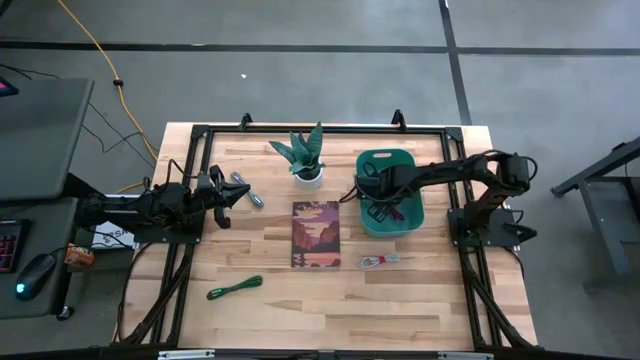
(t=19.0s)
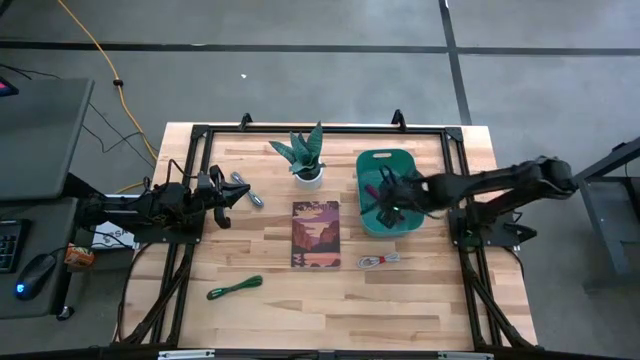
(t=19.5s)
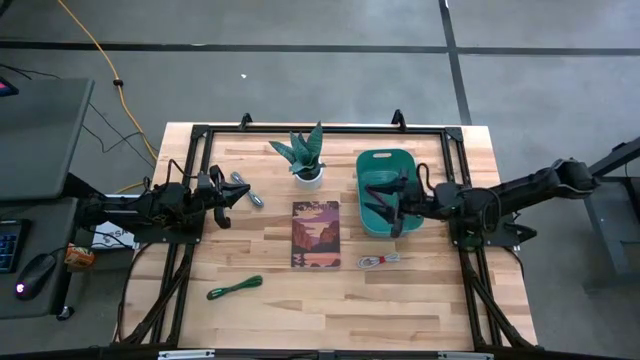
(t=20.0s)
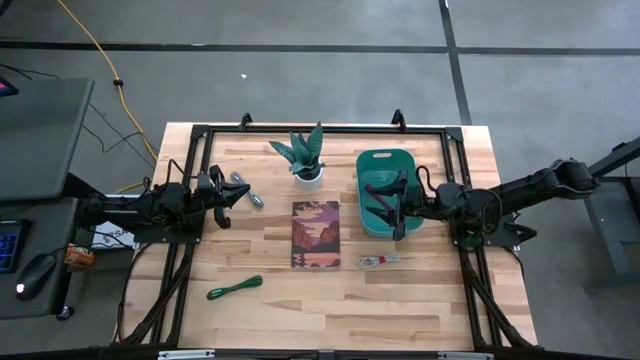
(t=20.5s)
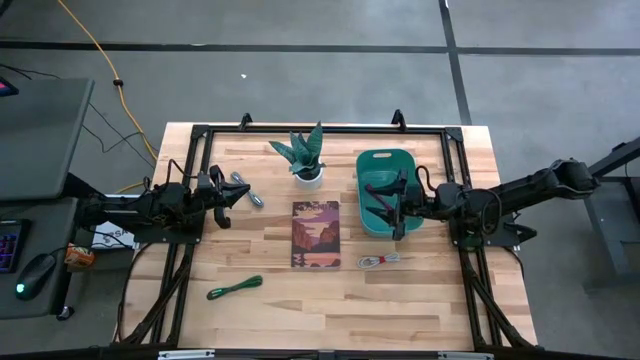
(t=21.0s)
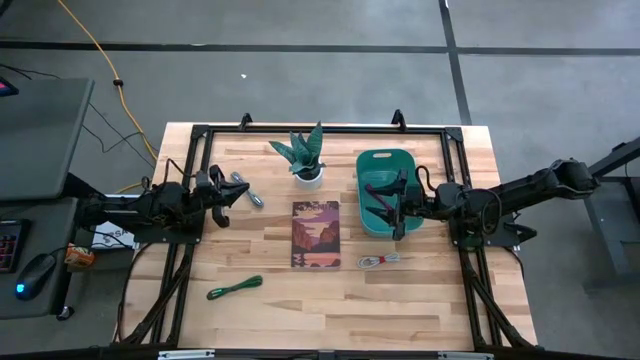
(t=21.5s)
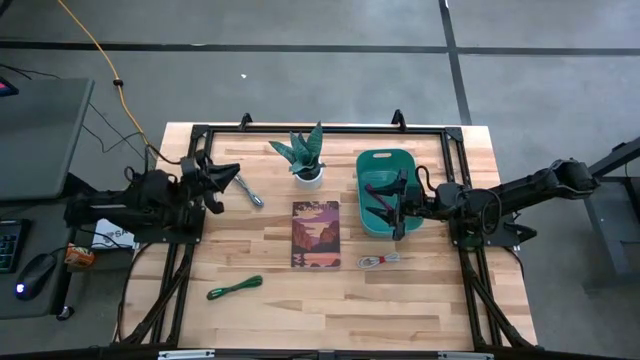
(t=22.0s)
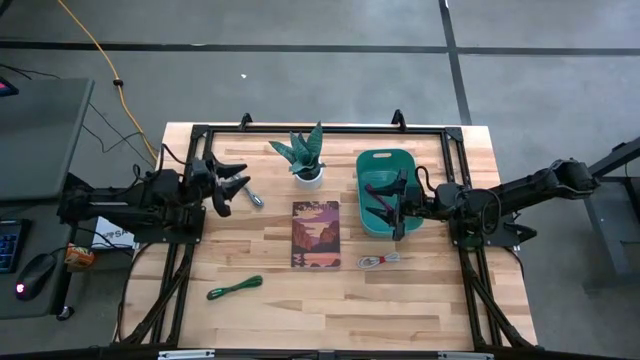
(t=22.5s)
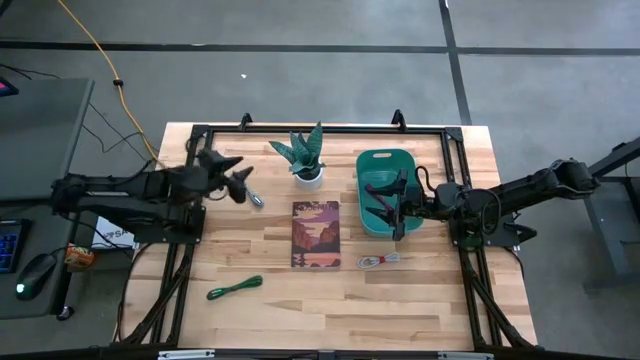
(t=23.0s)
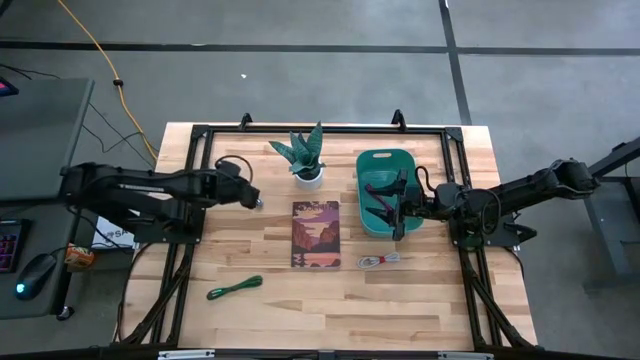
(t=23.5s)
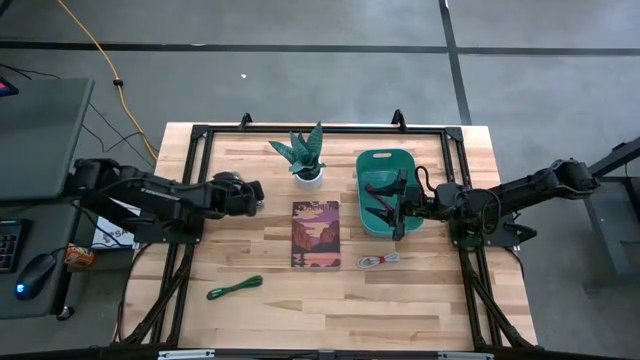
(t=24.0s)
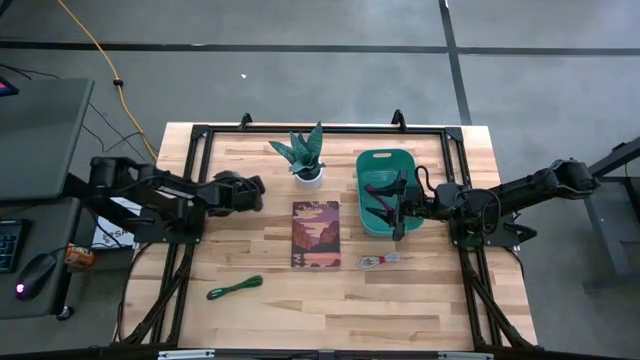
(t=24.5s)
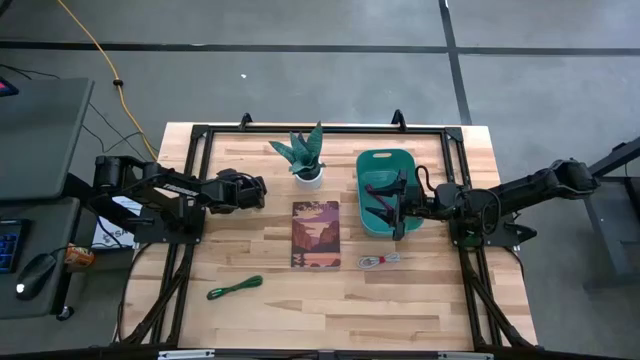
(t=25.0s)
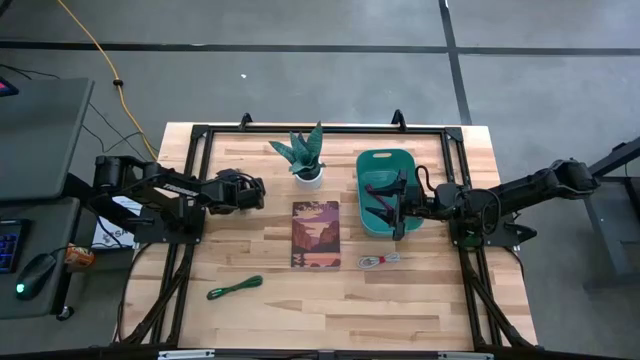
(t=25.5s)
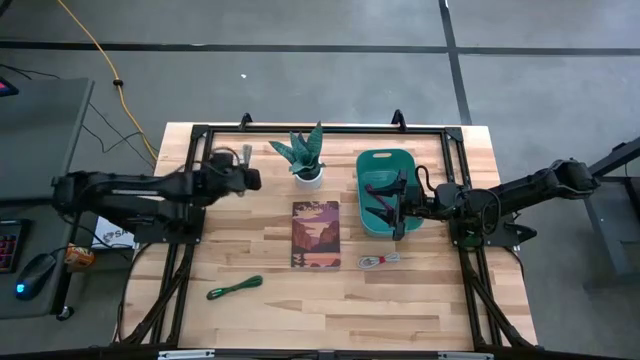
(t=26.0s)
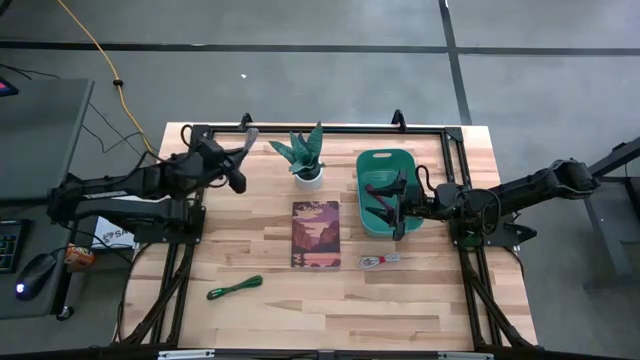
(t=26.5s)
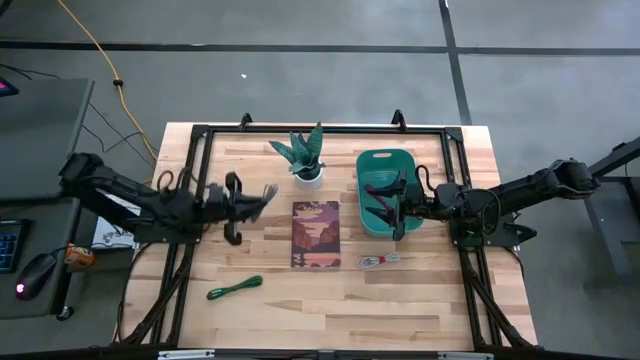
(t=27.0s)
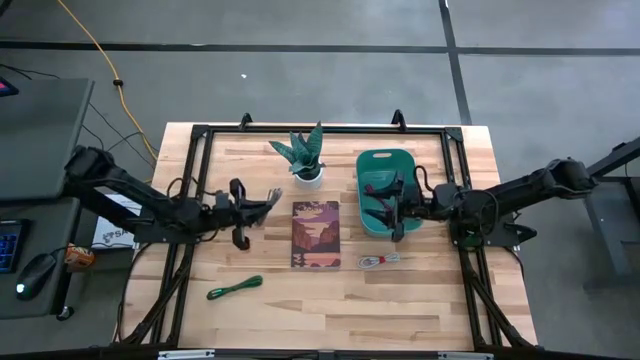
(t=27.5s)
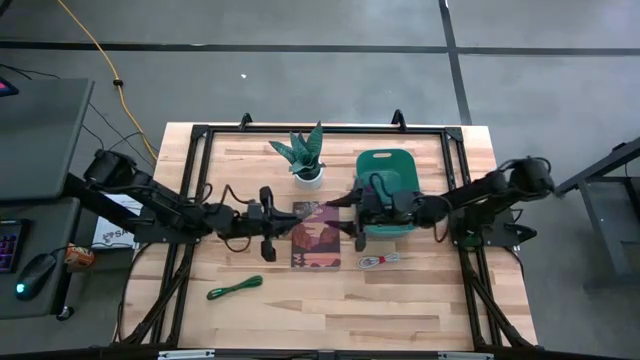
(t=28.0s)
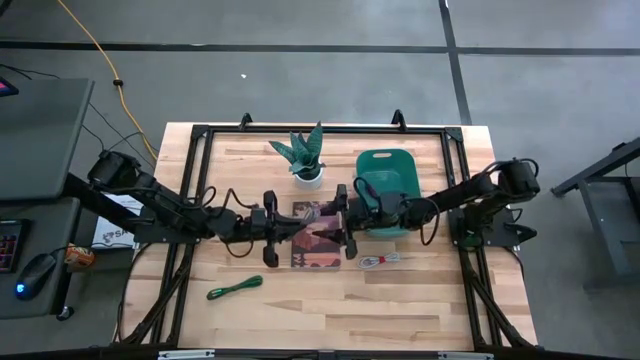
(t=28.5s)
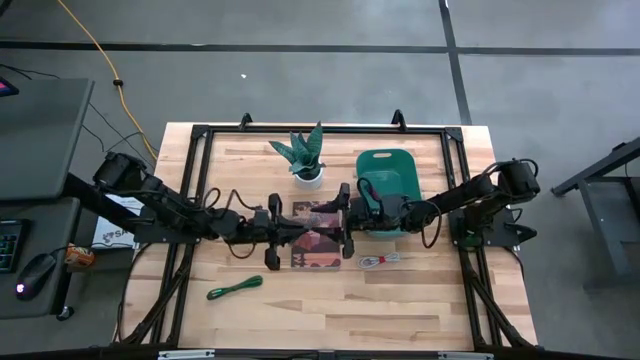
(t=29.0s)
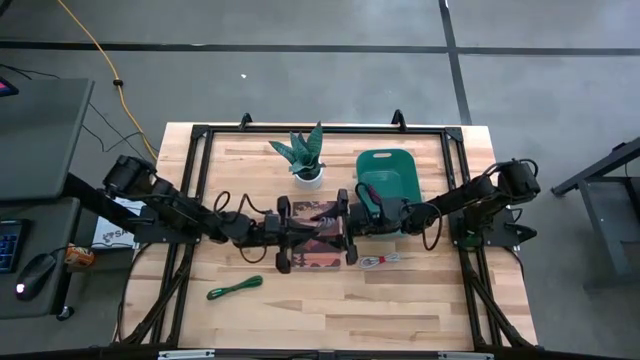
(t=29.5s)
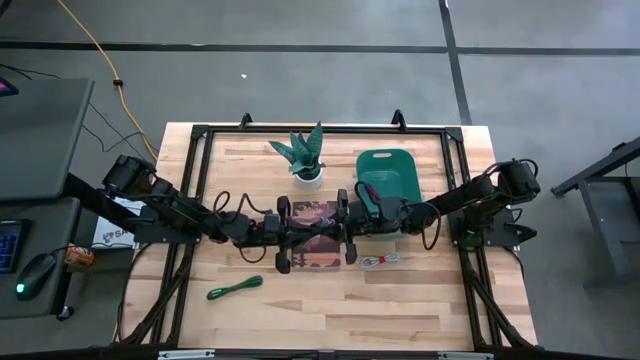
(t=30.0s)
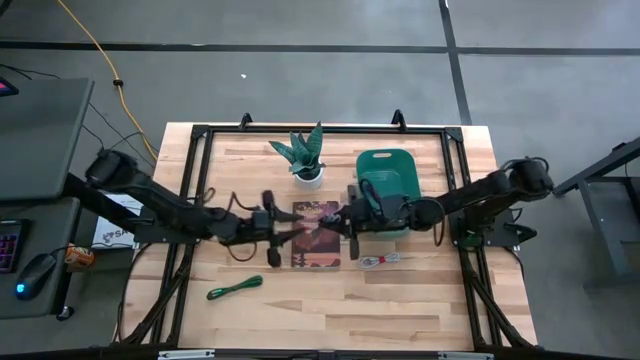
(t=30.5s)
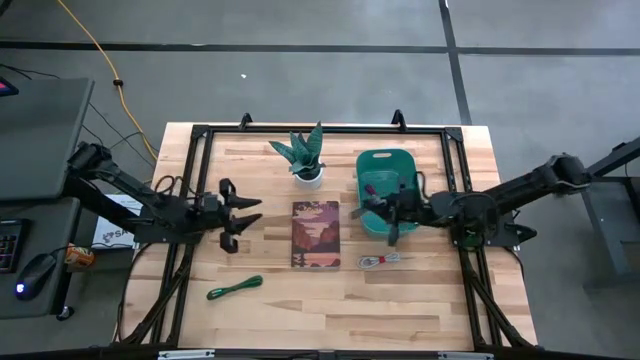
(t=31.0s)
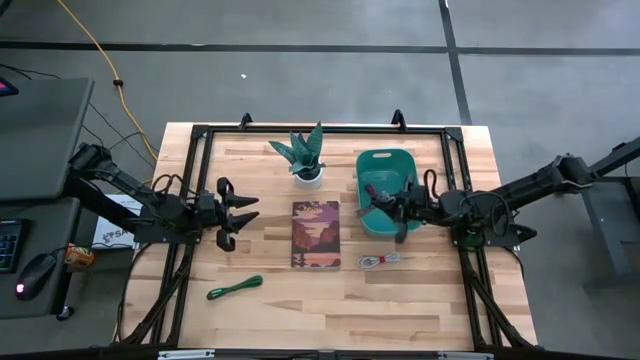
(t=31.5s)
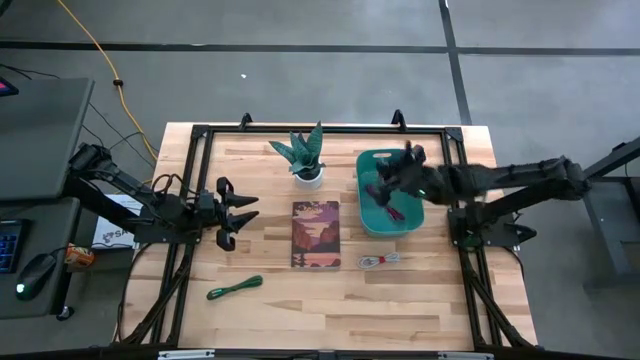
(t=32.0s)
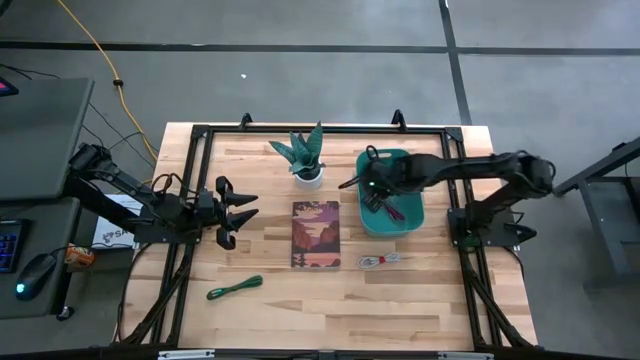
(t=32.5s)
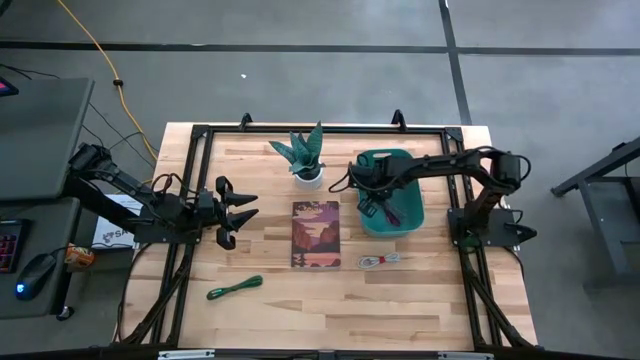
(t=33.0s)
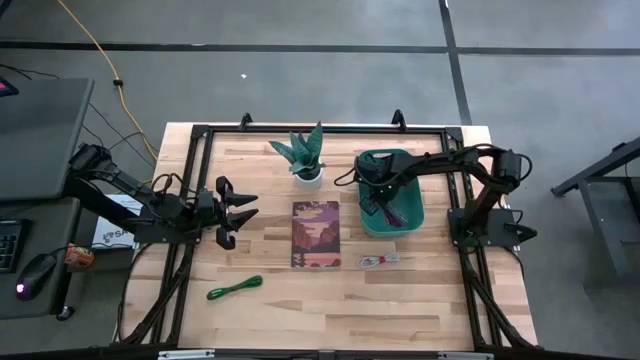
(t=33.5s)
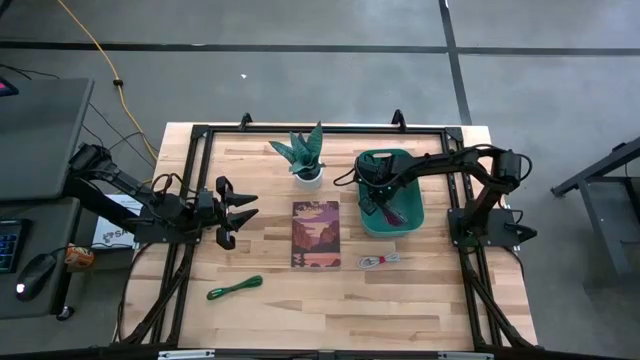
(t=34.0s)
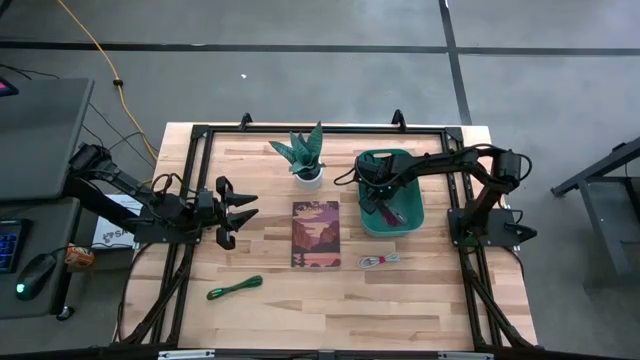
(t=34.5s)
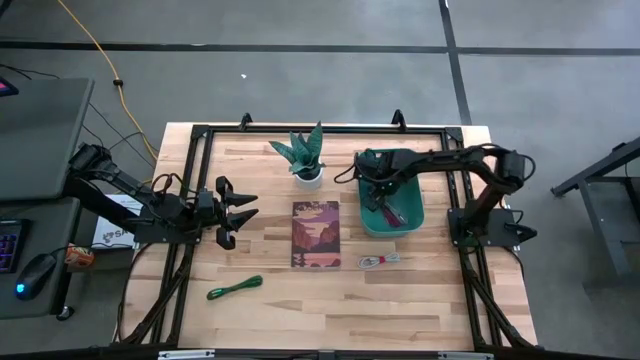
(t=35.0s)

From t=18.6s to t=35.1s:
Task: Pick and place USB-C Cables
Put the white stripe charger cable into the green bin
